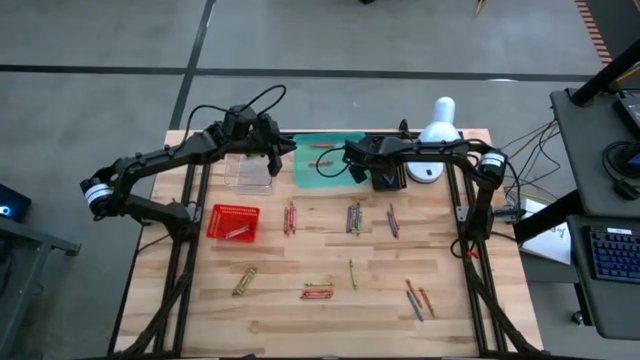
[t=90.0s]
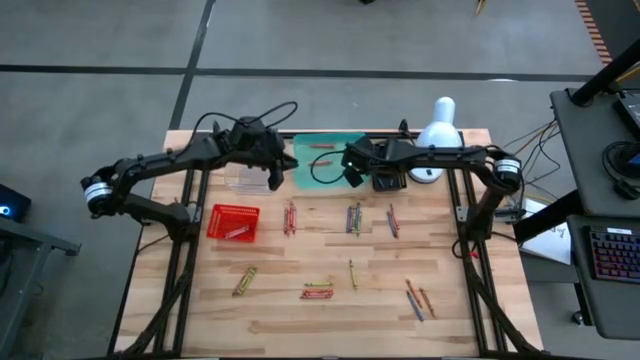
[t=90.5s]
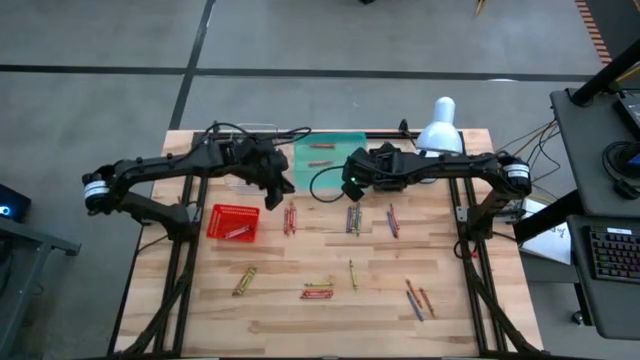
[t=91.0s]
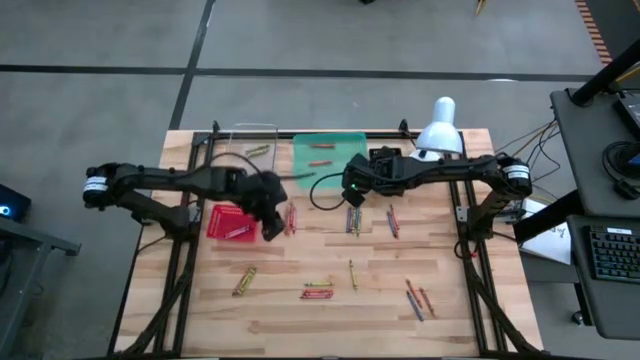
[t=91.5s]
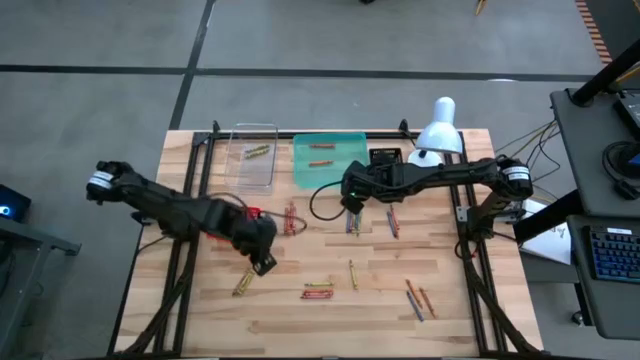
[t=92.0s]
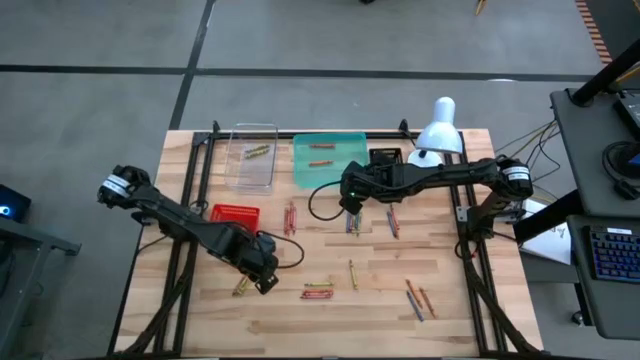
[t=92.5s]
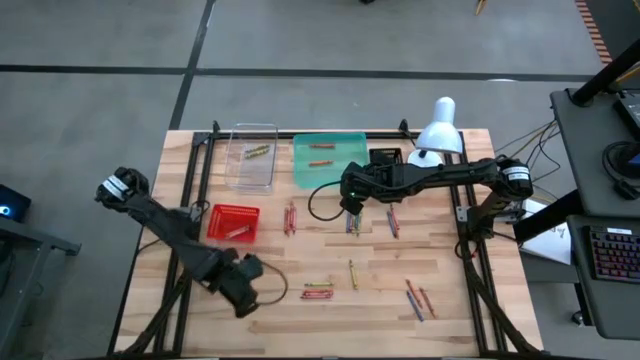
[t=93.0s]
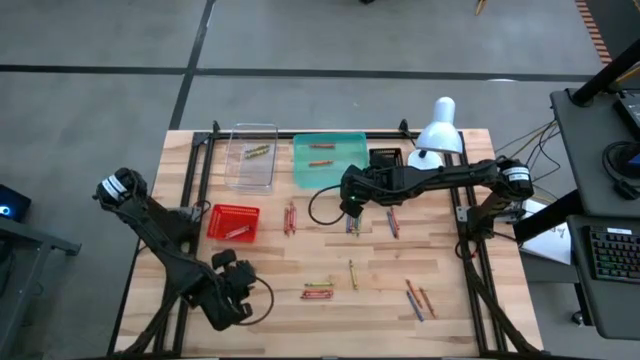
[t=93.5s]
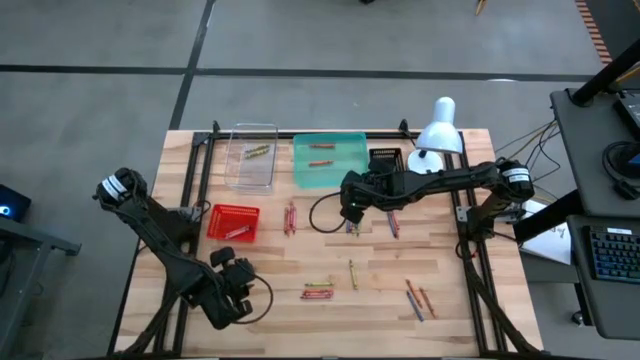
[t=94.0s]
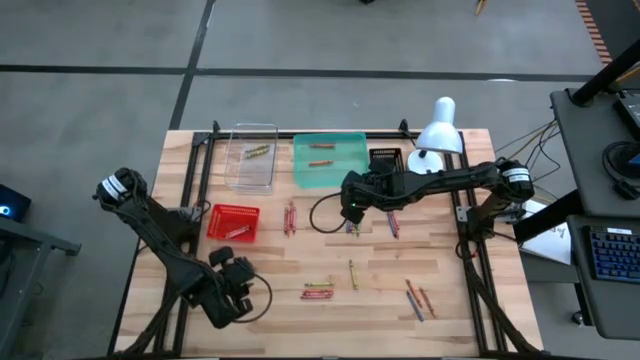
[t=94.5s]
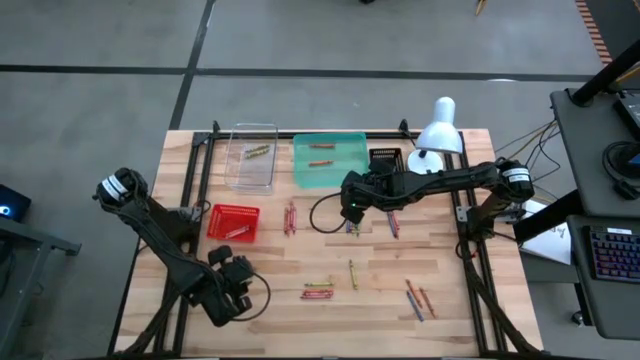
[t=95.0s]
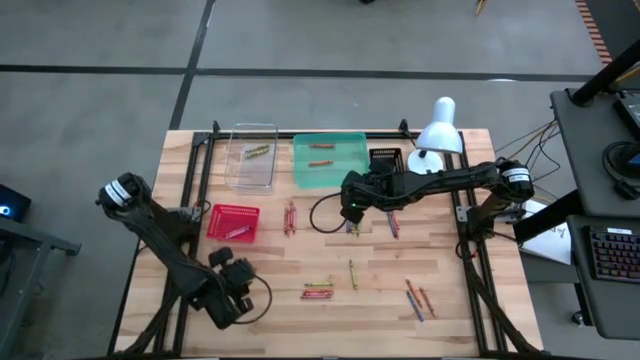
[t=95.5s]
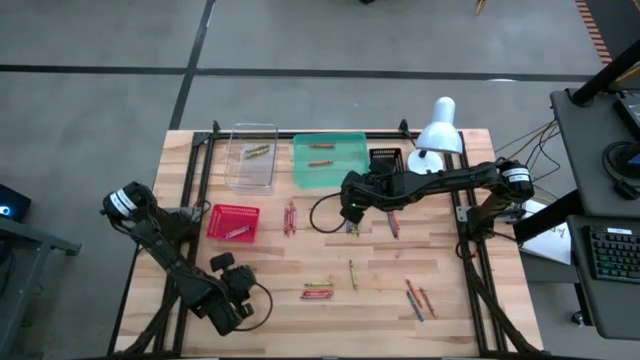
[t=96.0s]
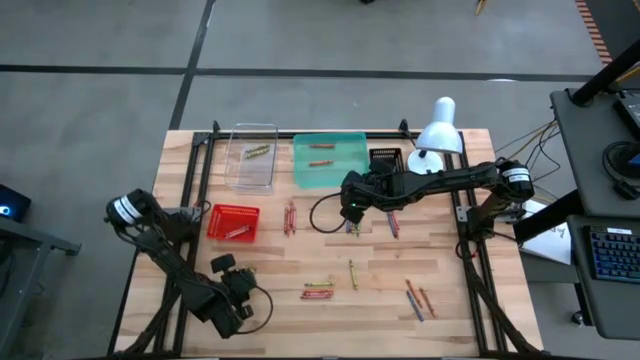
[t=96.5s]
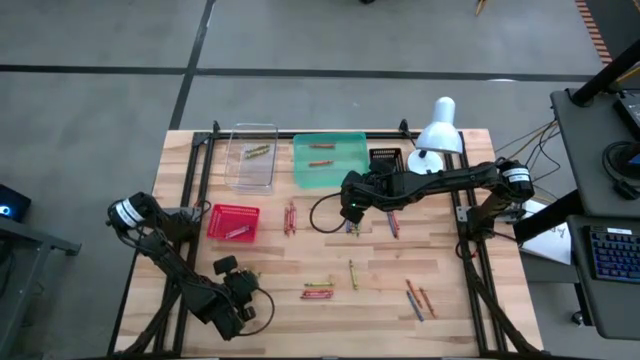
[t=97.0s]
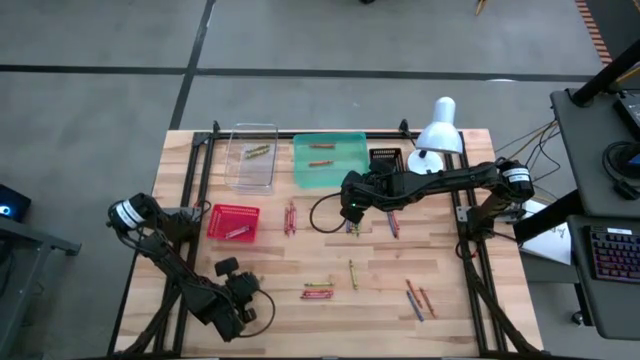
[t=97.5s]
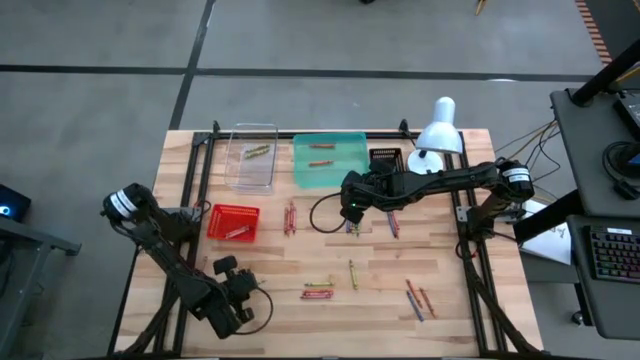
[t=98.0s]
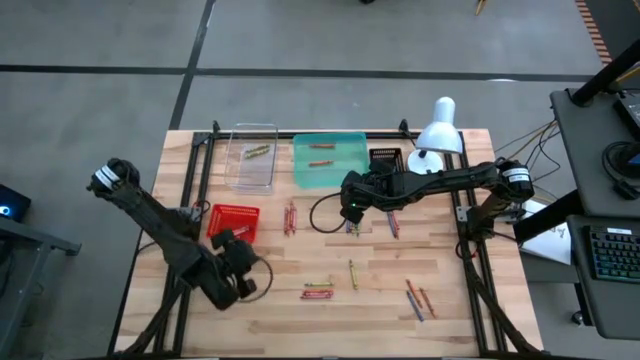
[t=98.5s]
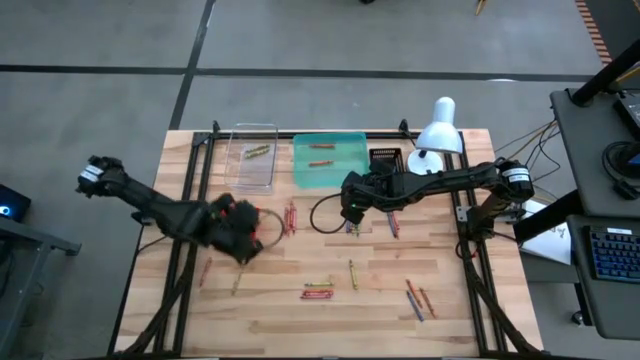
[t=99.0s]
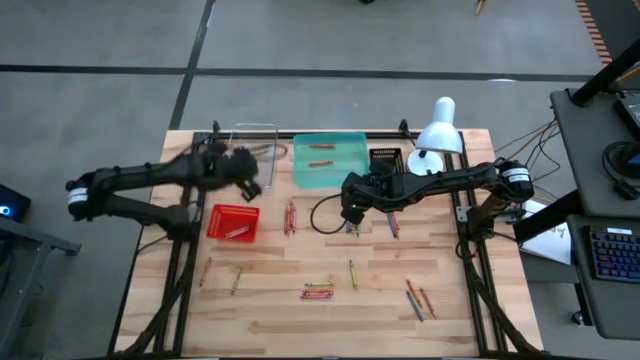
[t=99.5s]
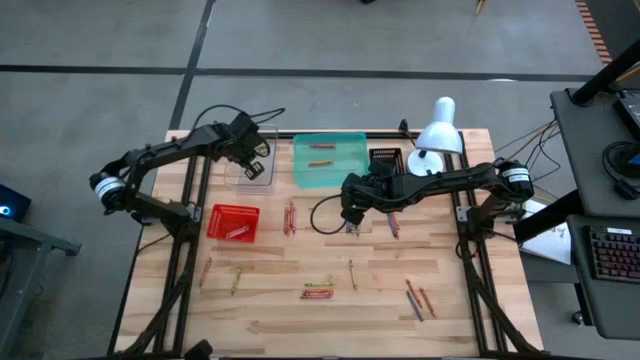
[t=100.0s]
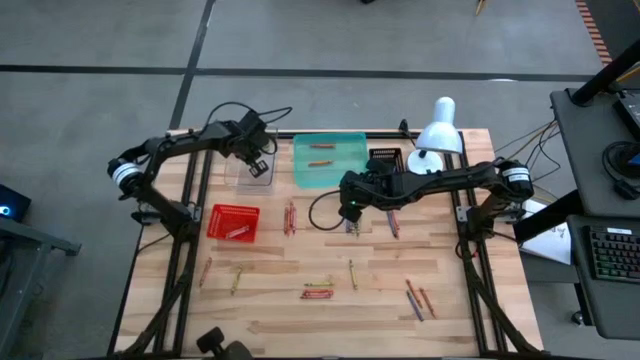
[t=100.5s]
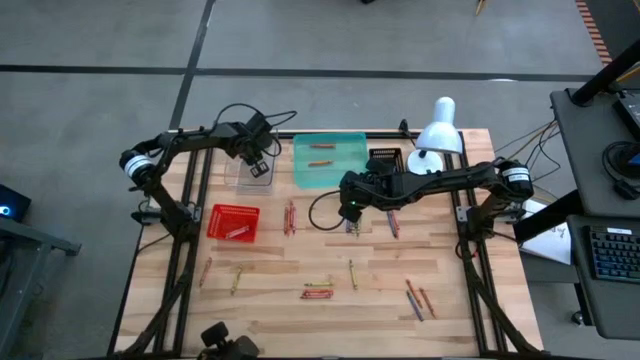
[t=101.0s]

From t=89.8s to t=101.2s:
Task: Sort crayons
Put the green crayon into the transparent bin

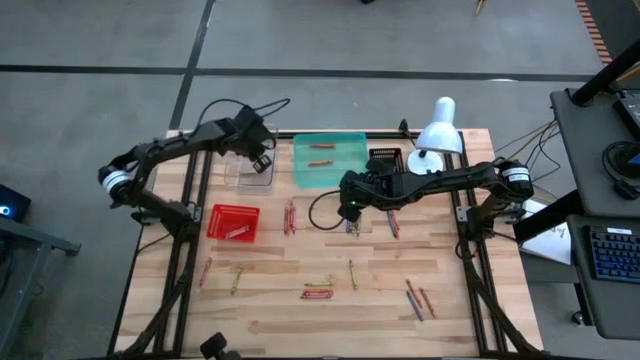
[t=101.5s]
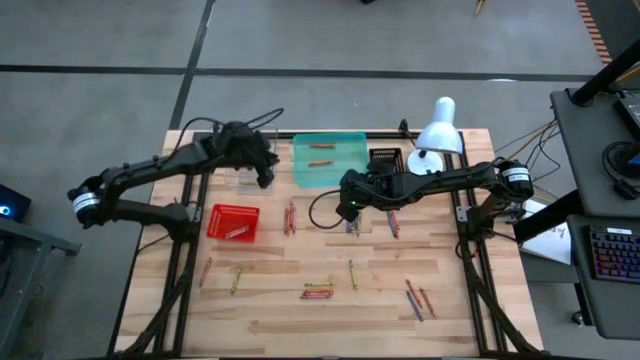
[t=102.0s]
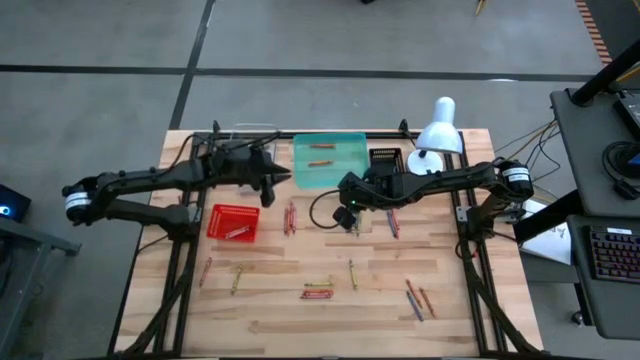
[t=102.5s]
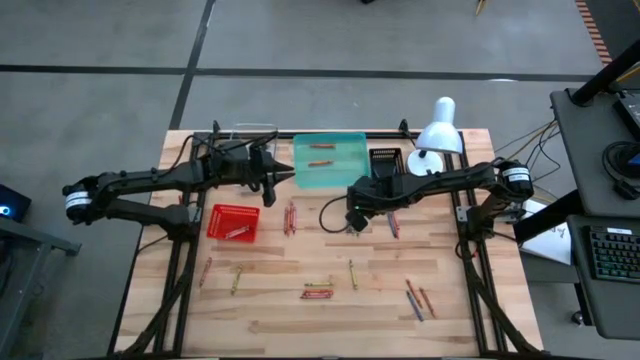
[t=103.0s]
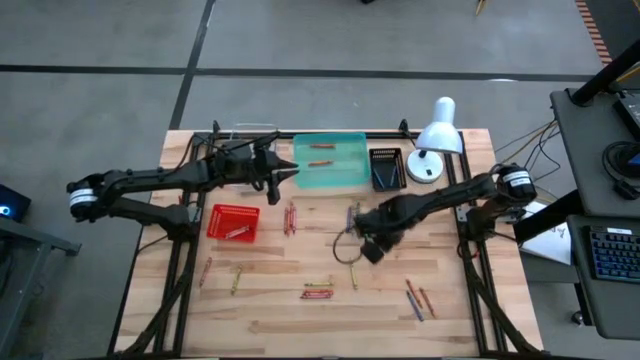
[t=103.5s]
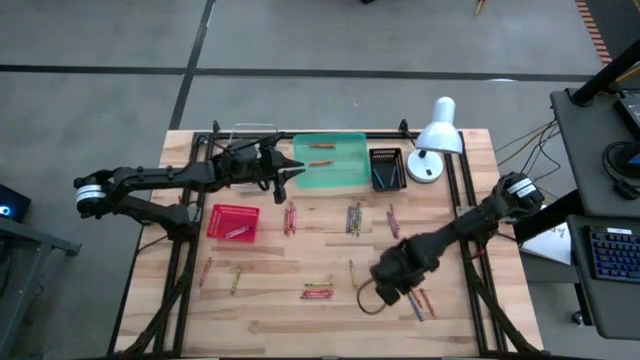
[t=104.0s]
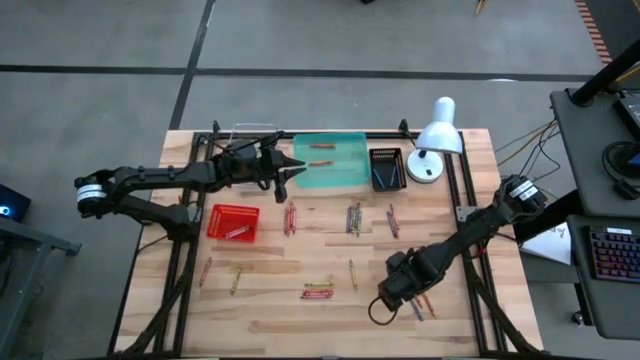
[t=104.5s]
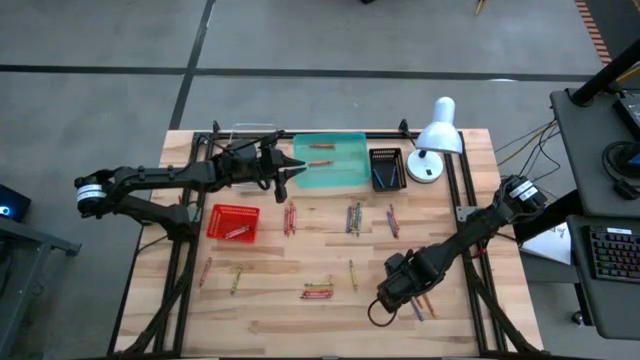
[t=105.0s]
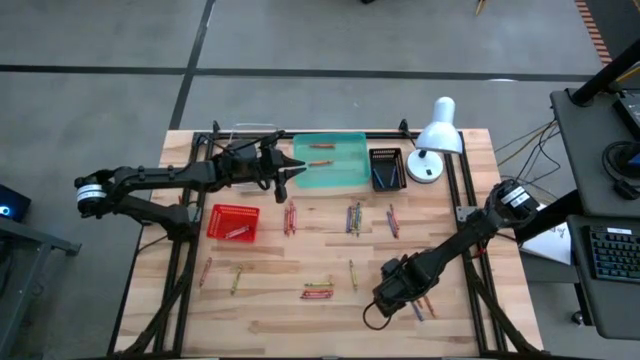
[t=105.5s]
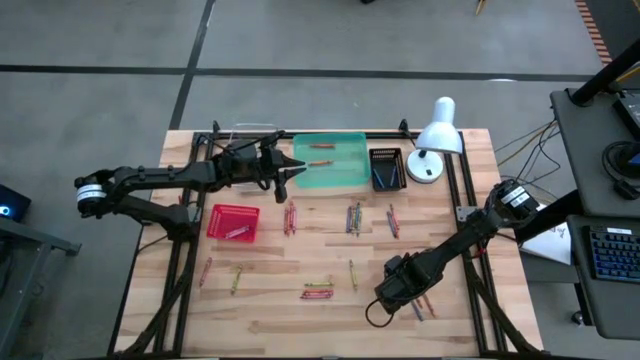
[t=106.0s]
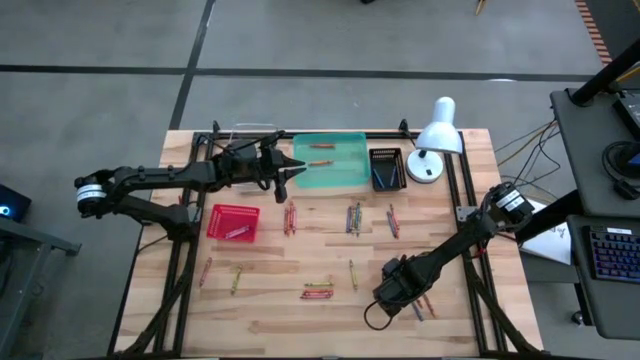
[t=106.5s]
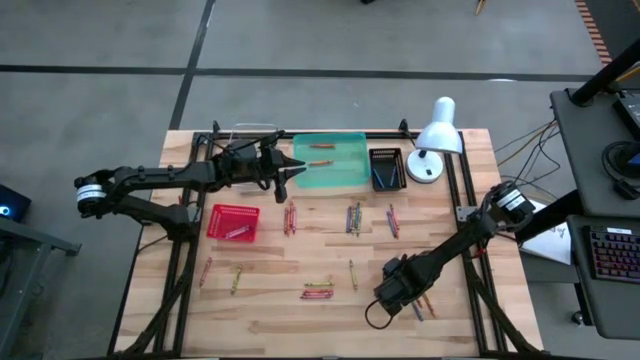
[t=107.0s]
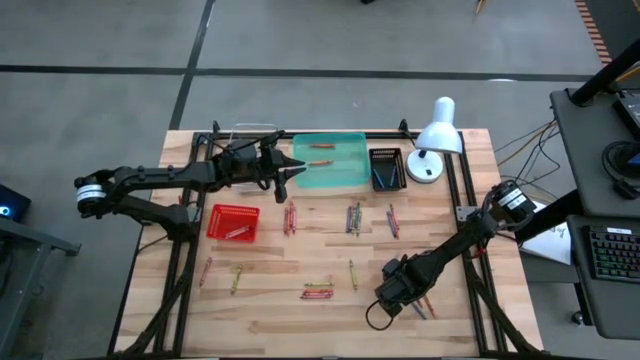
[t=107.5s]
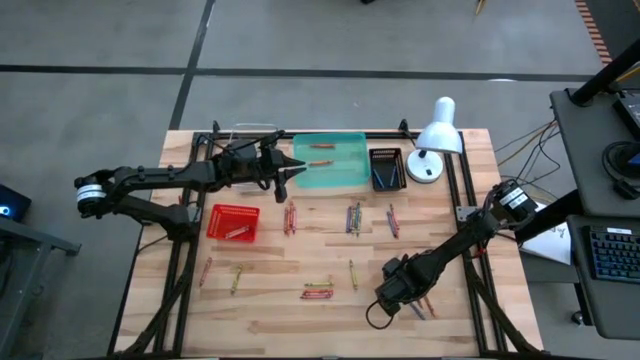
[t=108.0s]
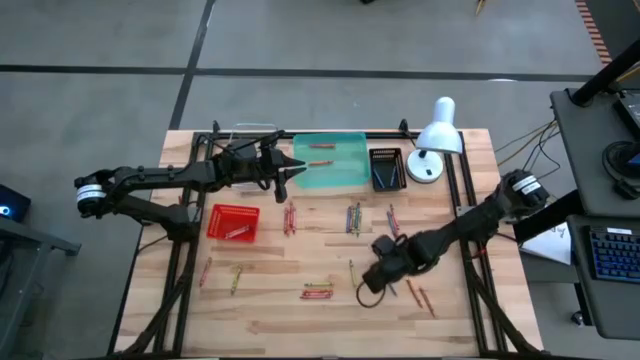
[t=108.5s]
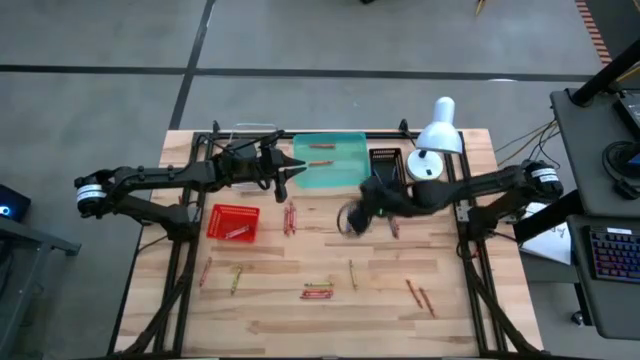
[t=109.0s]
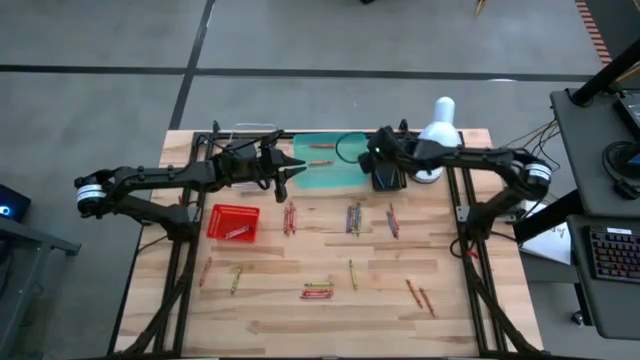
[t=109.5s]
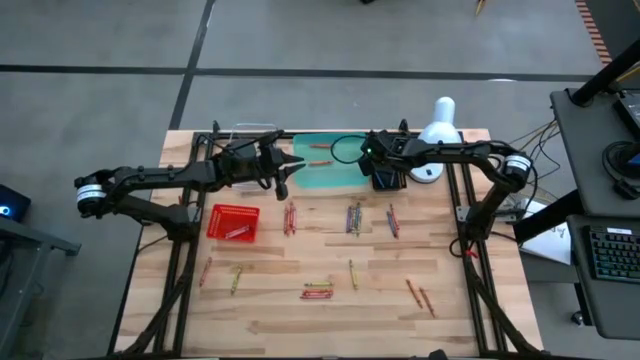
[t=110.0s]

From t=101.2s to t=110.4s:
Put the blue crayon into the black bin
